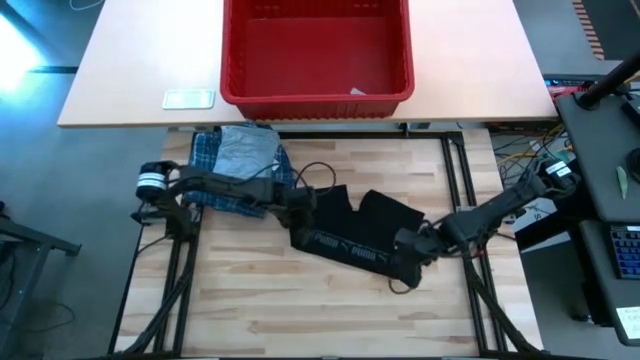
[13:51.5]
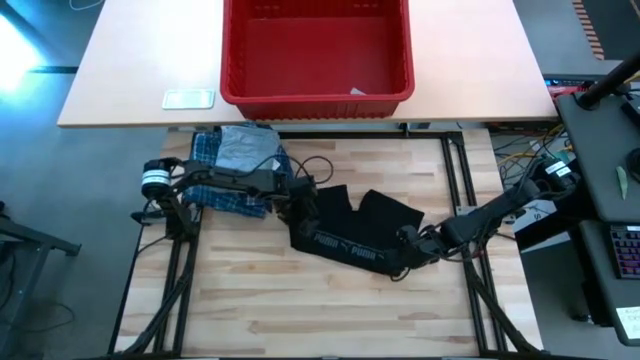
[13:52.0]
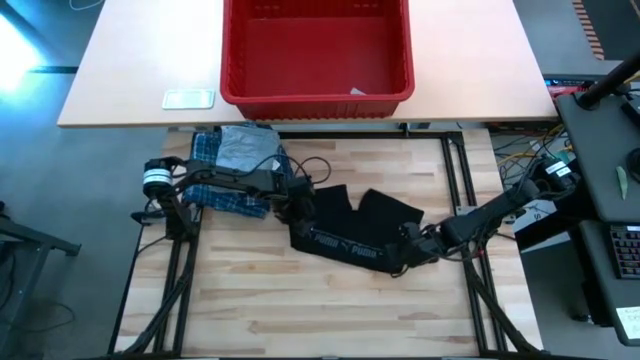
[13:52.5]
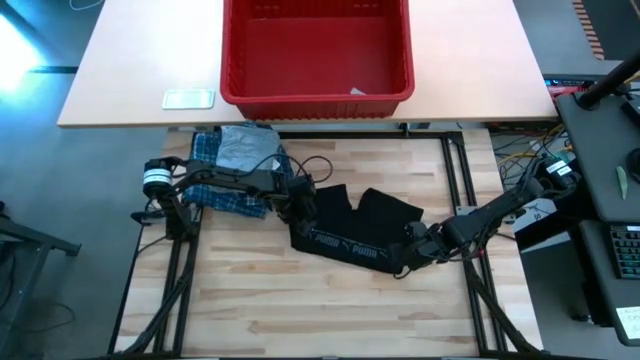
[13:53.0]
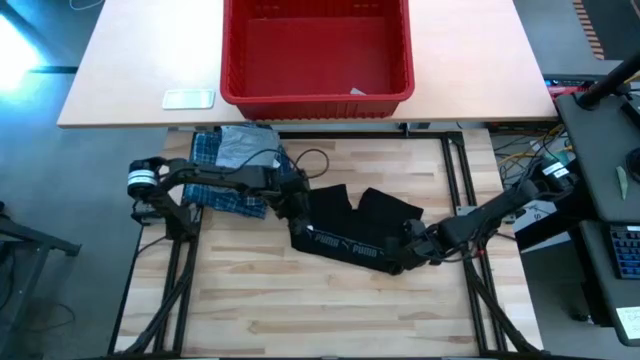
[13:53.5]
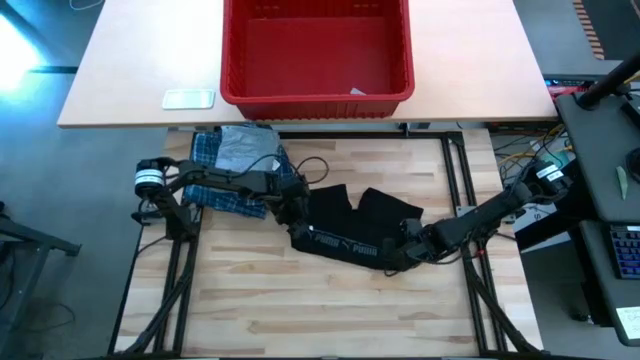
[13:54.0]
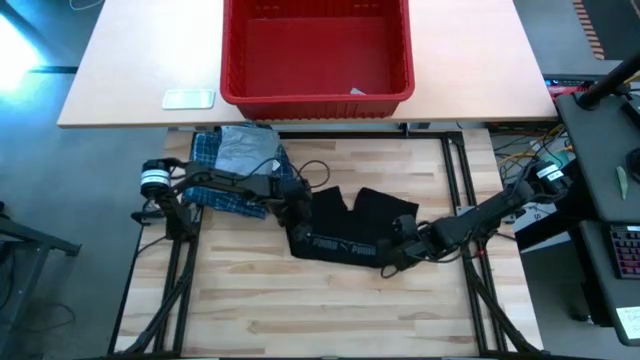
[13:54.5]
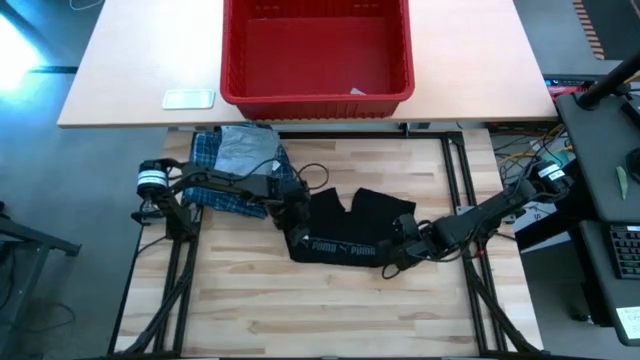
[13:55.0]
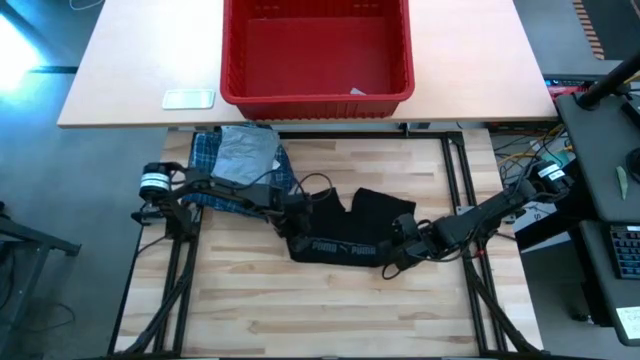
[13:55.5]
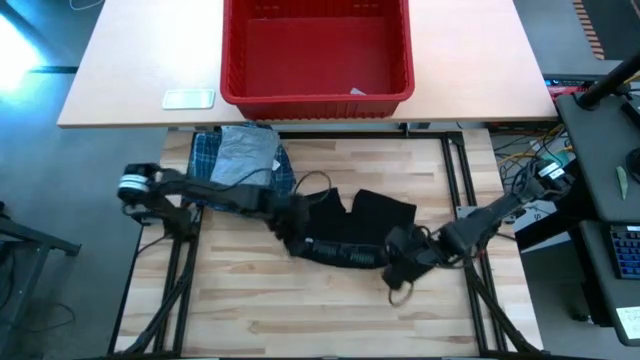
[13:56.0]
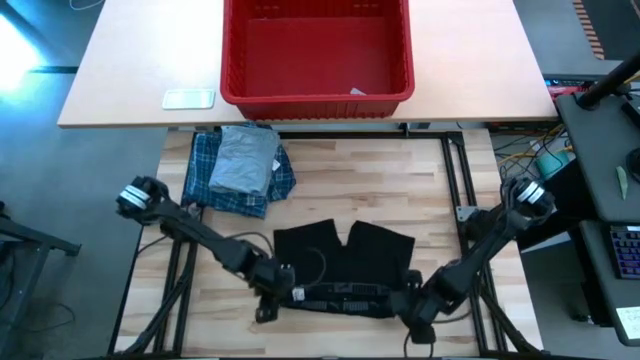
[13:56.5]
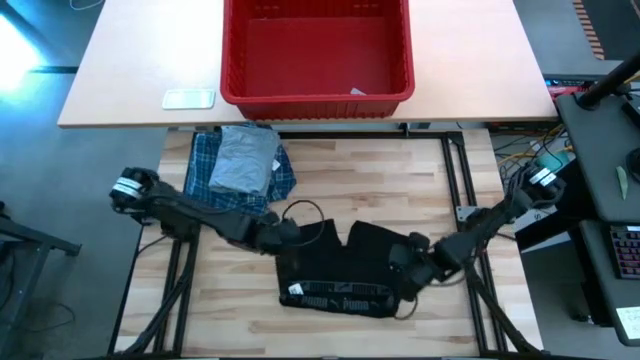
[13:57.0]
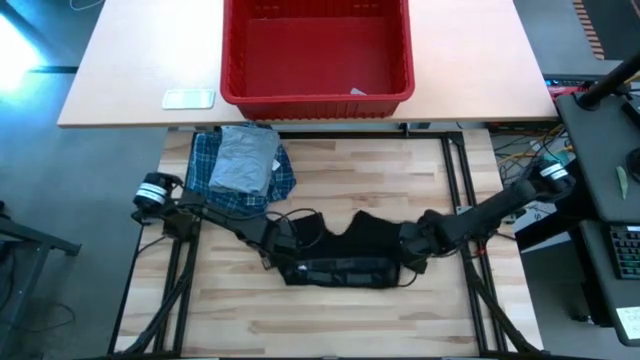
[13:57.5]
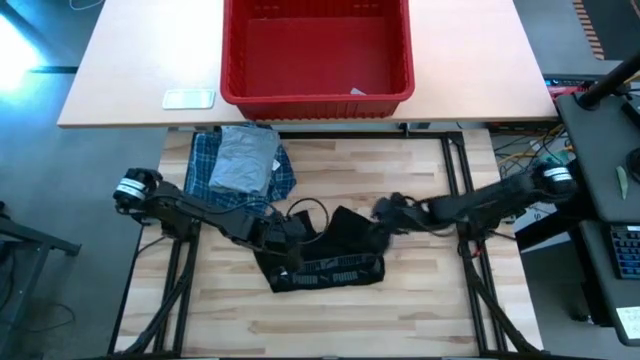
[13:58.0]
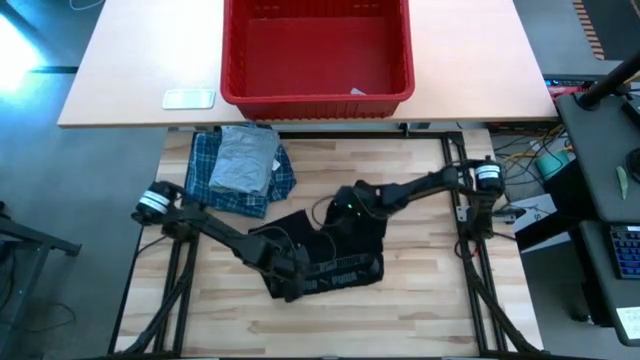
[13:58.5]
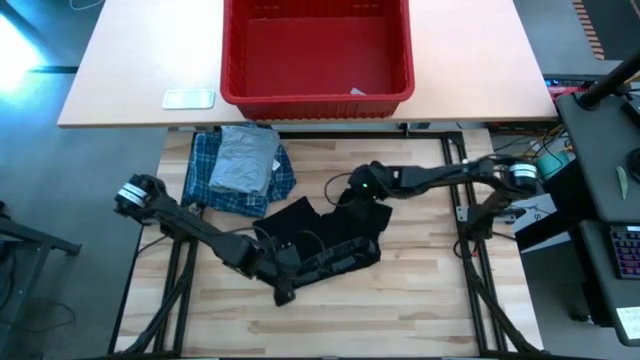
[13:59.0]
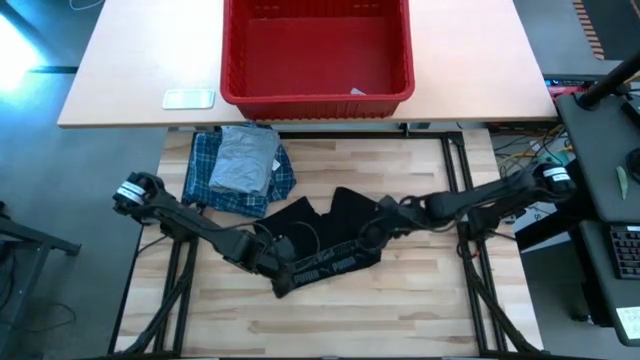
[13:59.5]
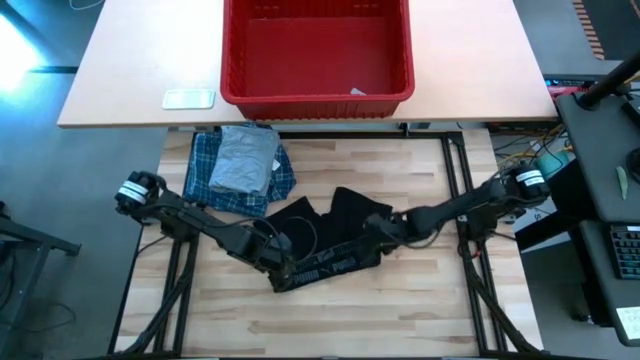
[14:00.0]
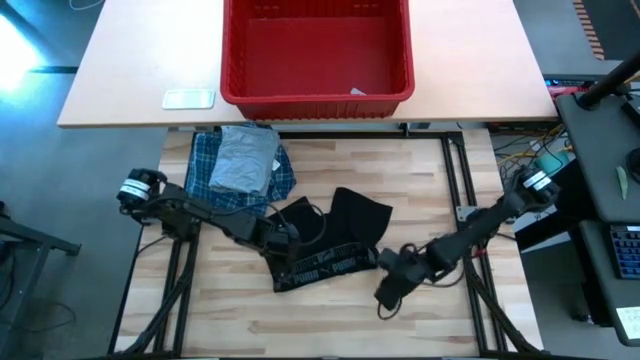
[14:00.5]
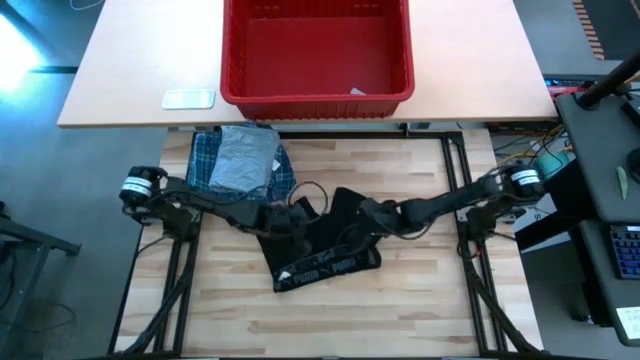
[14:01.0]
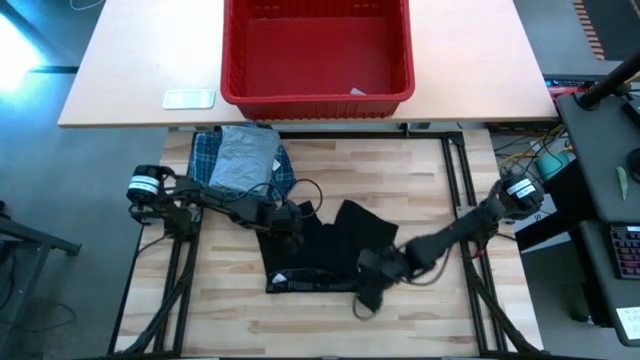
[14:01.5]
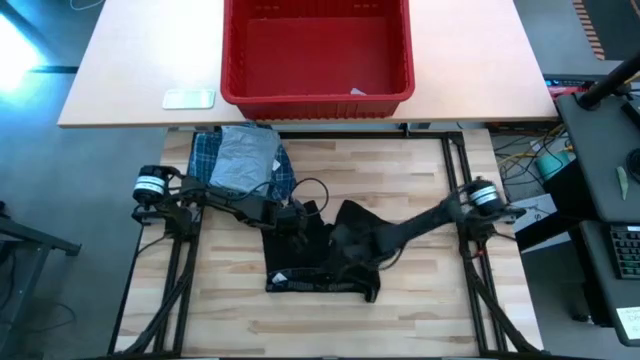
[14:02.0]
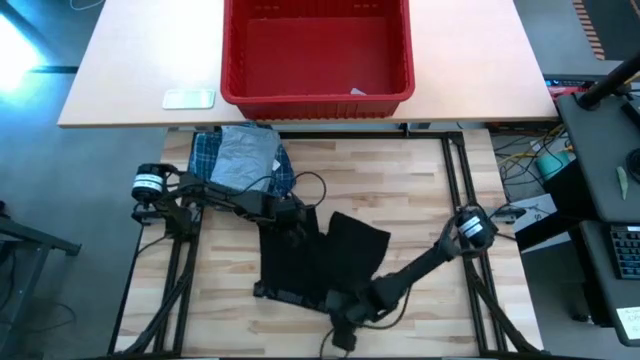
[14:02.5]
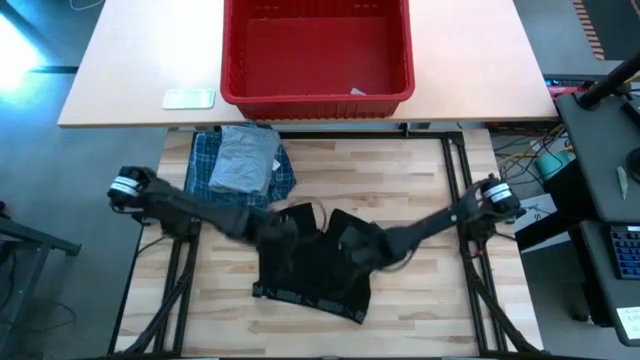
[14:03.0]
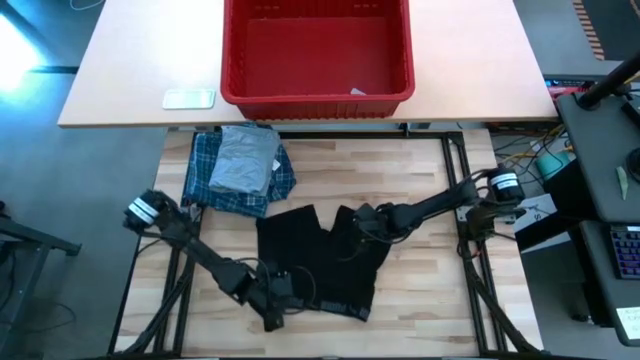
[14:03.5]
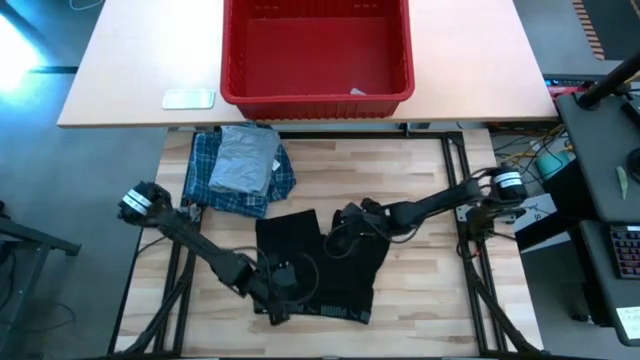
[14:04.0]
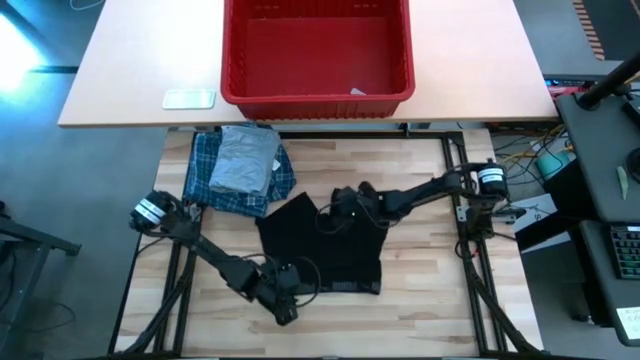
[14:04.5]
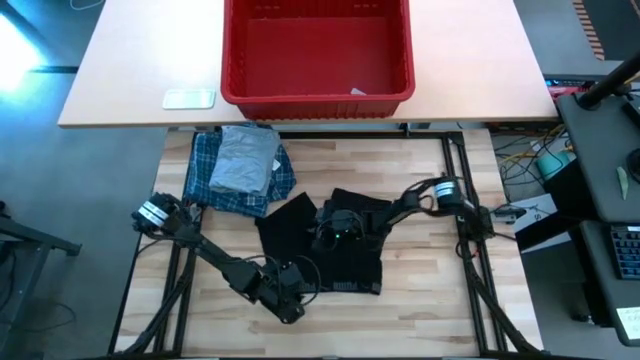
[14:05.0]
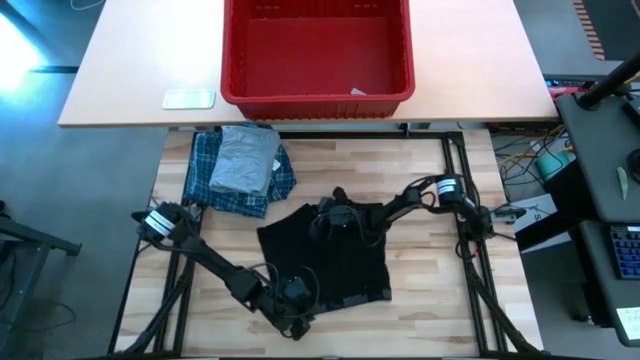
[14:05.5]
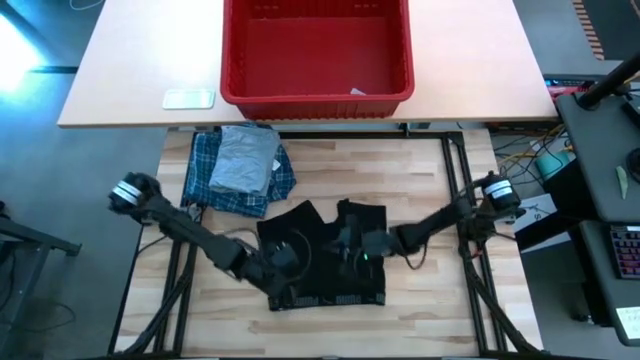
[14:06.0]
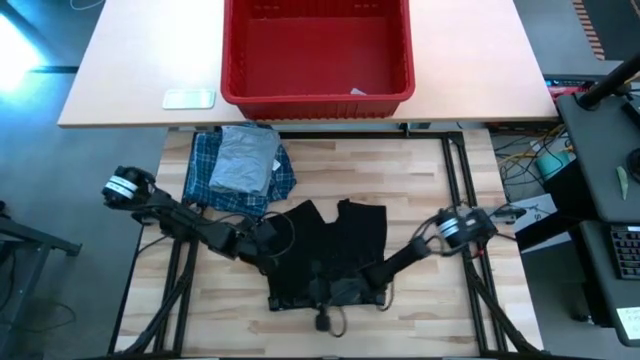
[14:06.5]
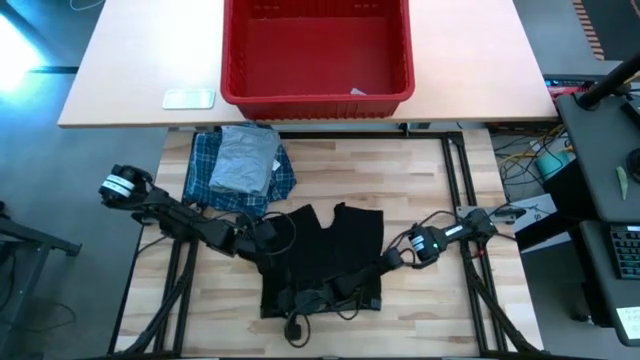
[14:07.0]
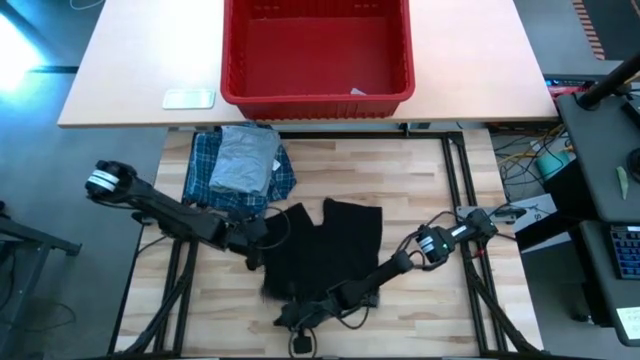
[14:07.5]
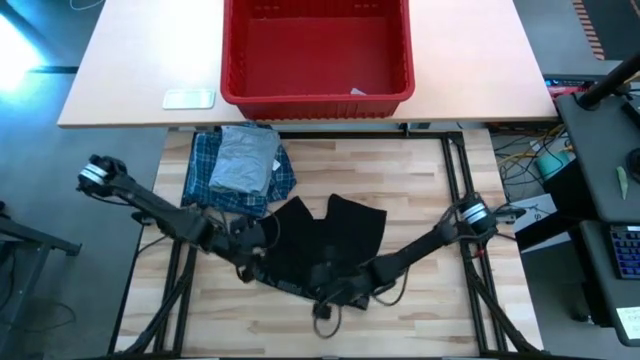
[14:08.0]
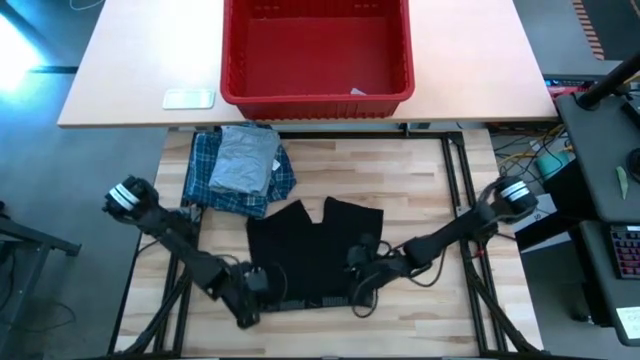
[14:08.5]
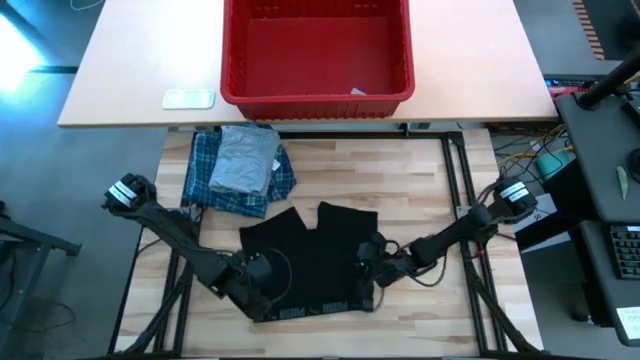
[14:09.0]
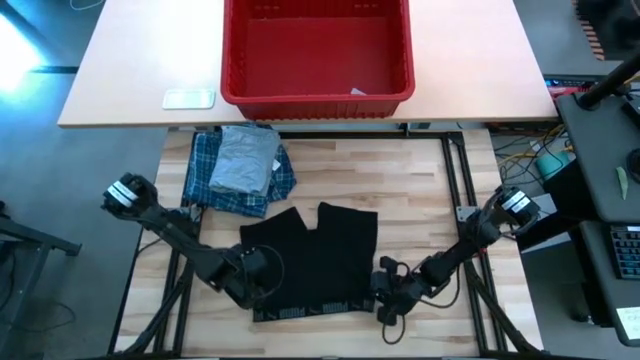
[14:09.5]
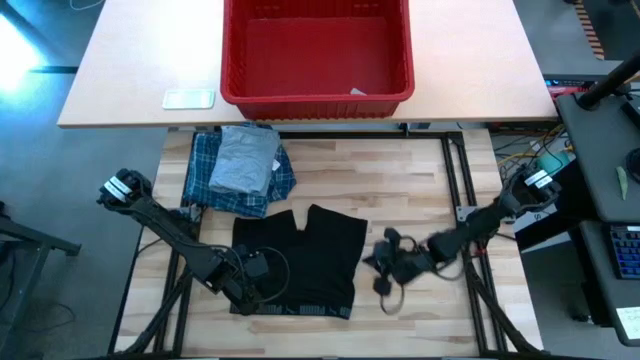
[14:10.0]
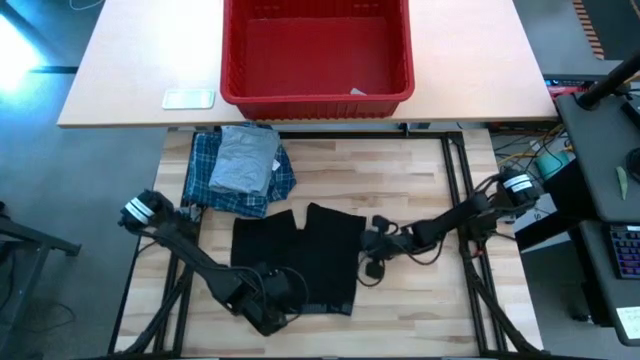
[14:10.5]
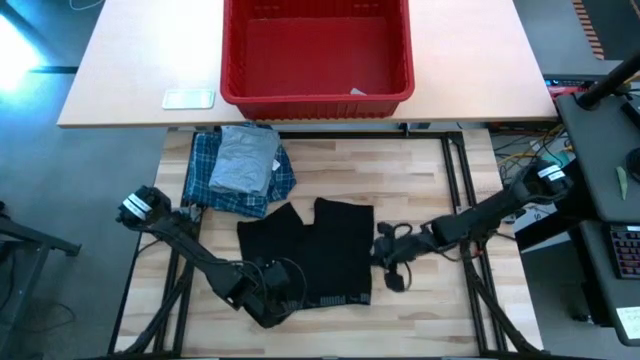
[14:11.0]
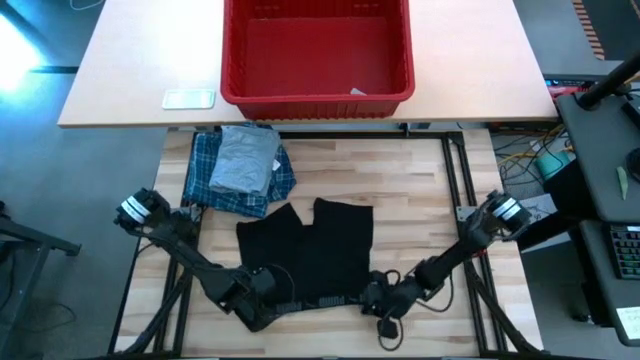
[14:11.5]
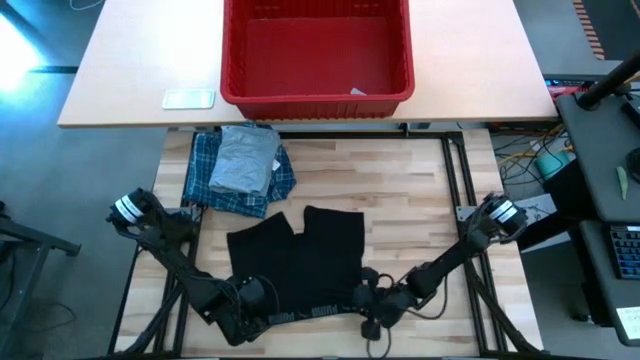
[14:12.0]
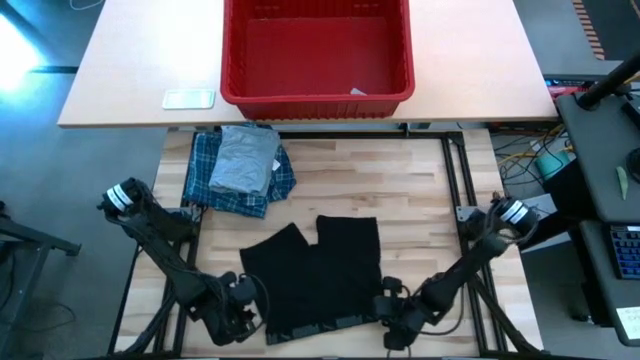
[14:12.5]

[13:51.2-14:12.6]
Task: Fold Laundry from Bin
Fold the black underwear
